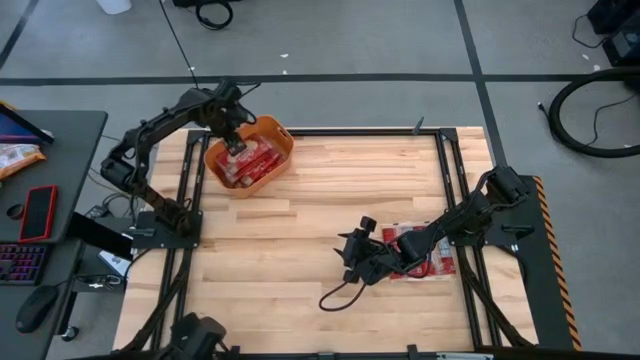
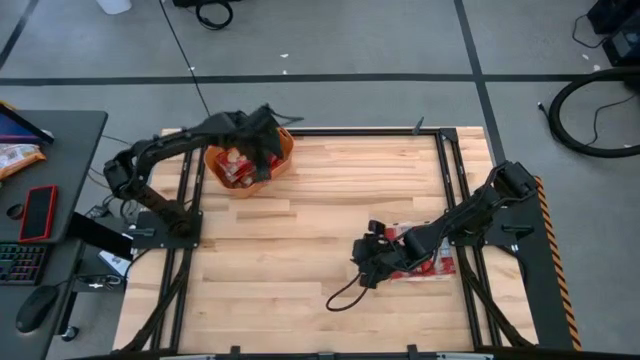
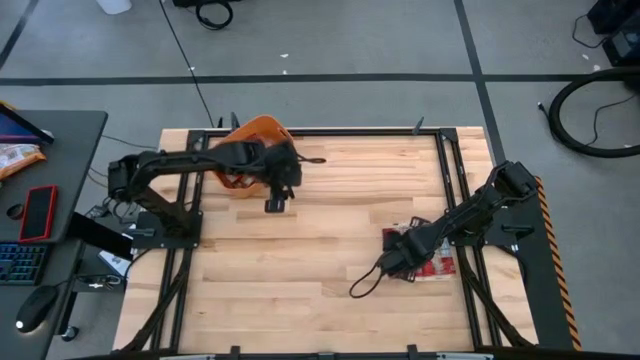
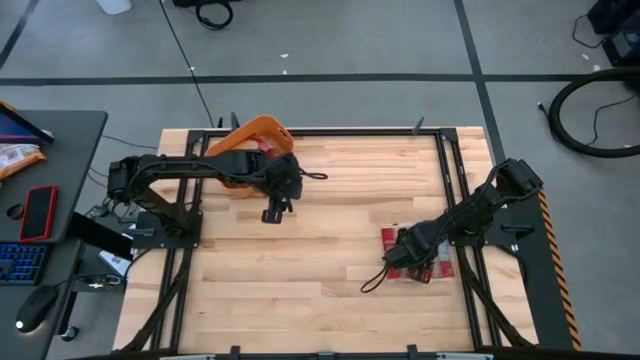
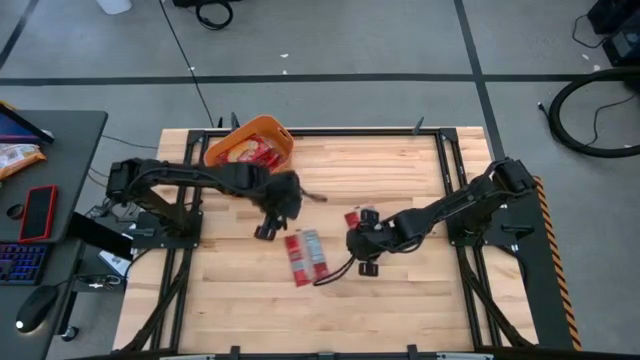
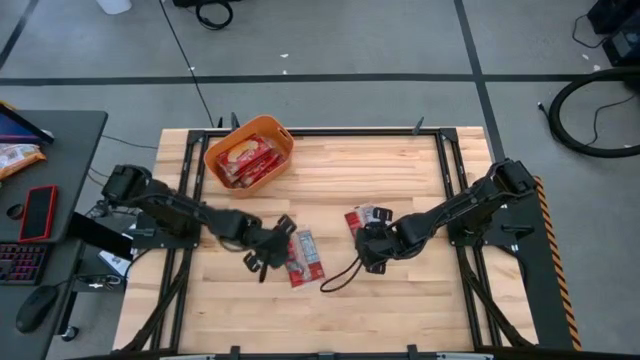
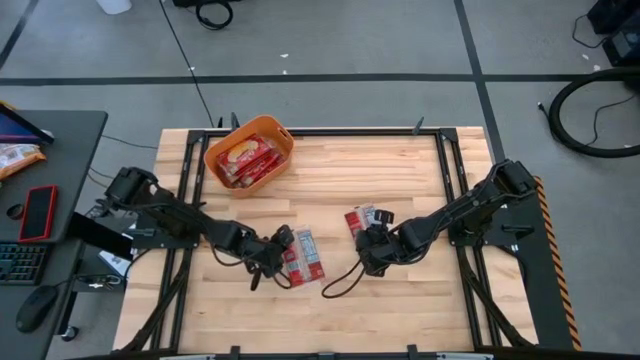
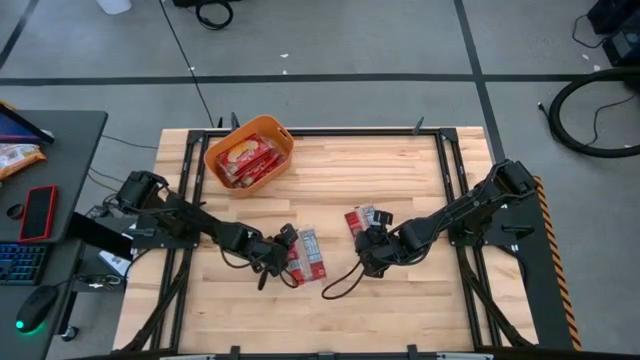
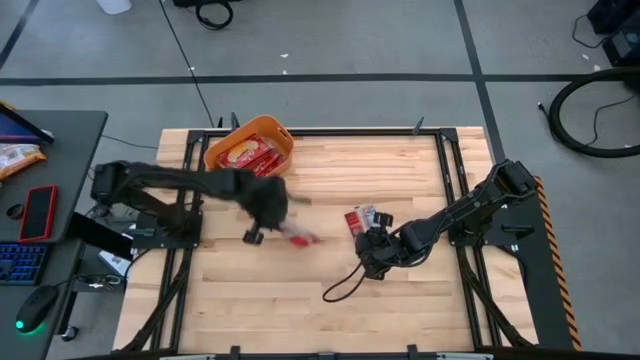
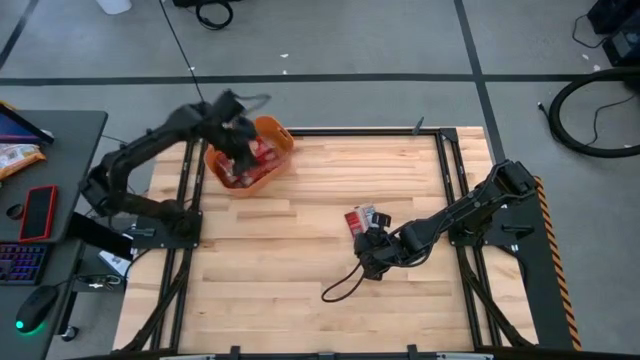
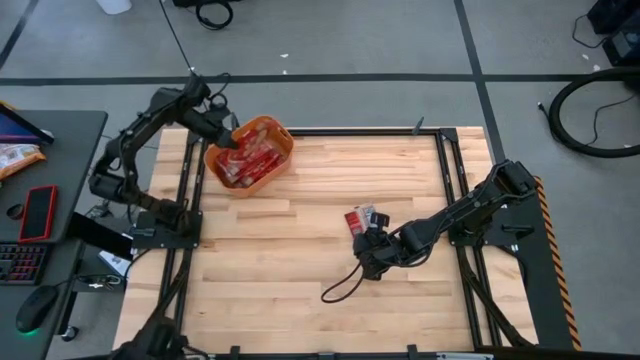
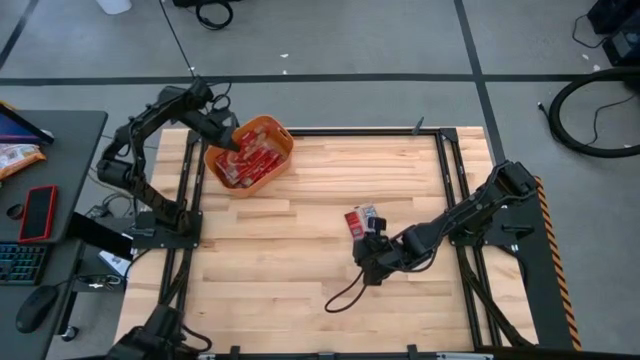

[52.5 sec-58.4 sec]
Task: Sort popcorn bags into baskets
Put the red popcorn bag into the orange container

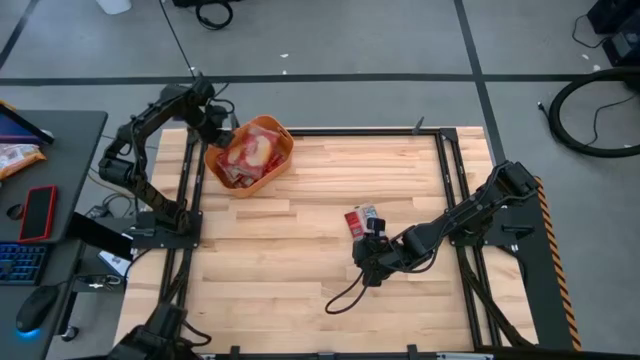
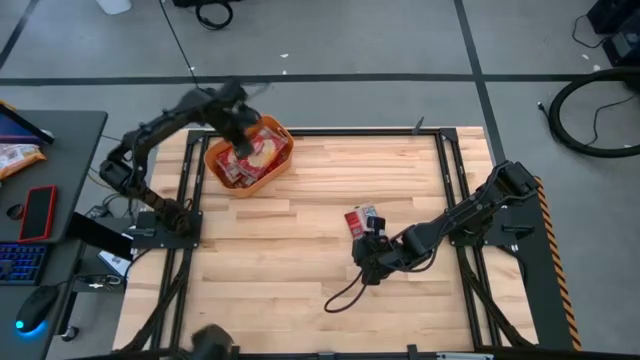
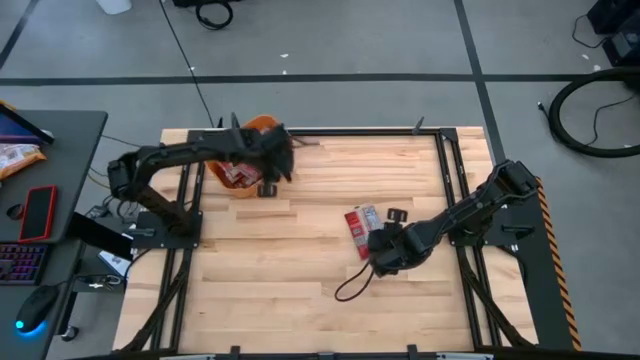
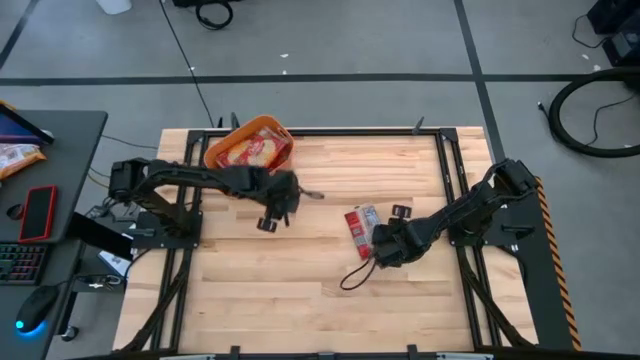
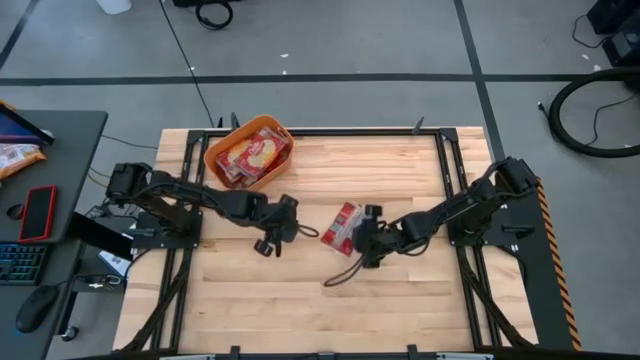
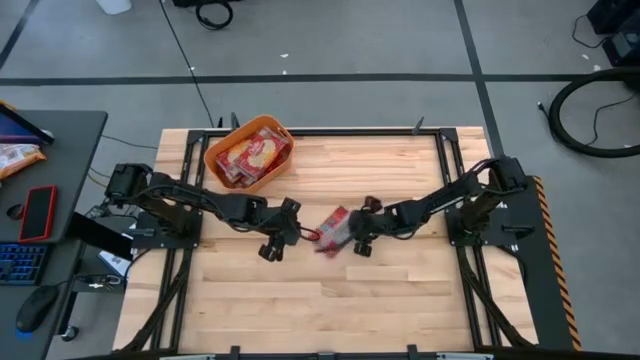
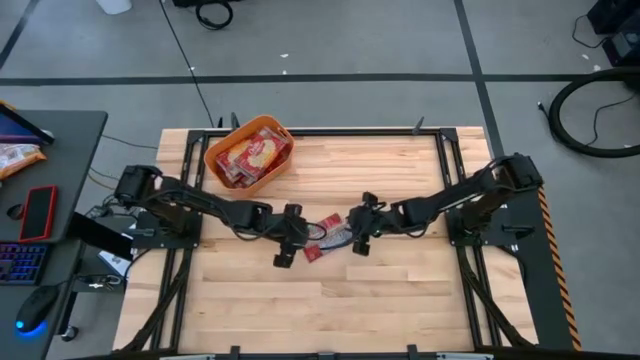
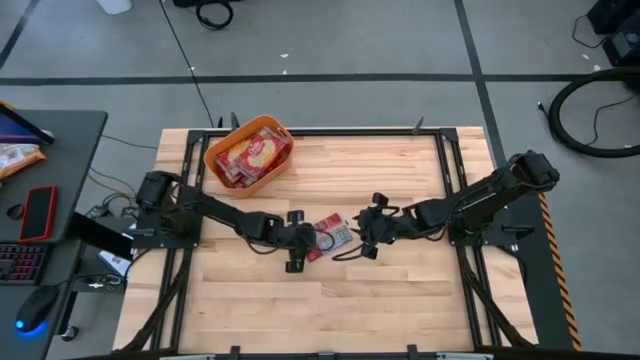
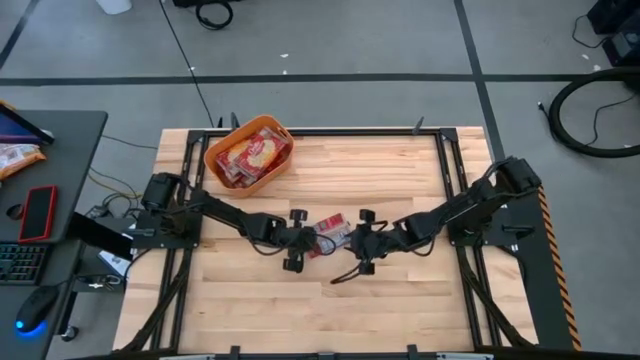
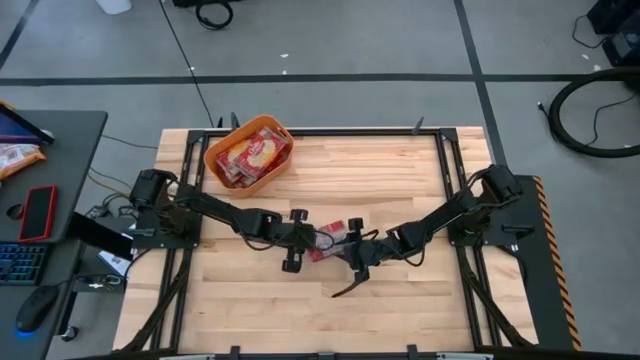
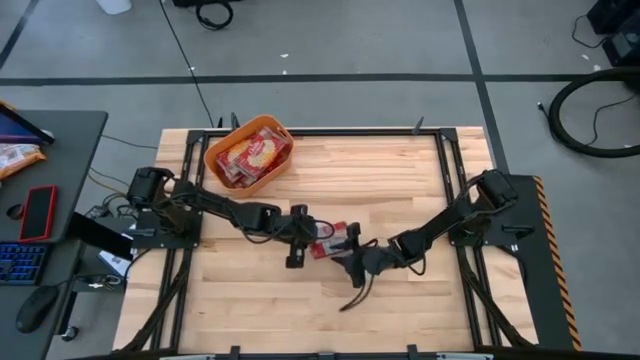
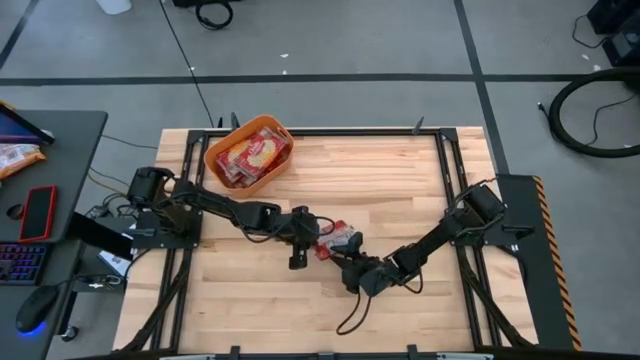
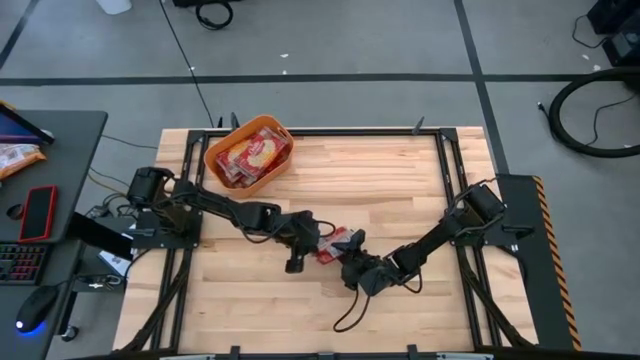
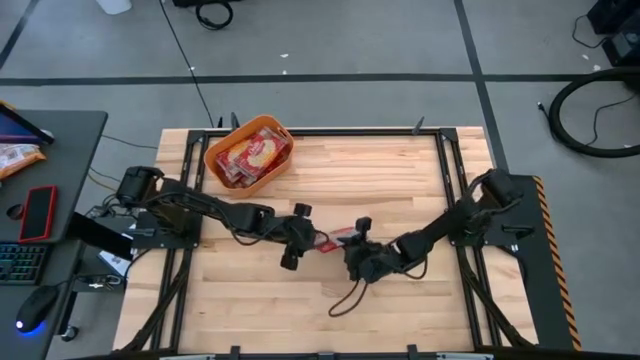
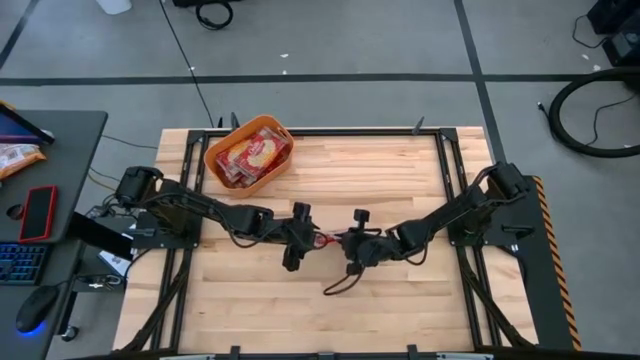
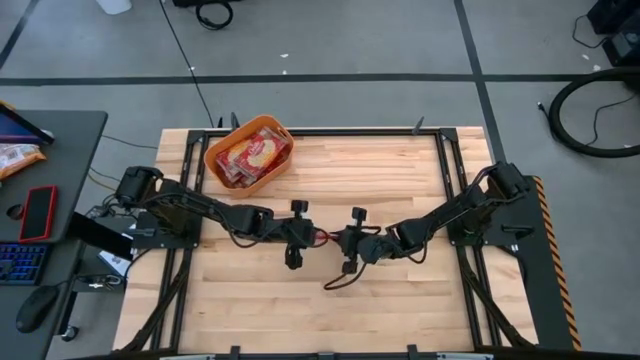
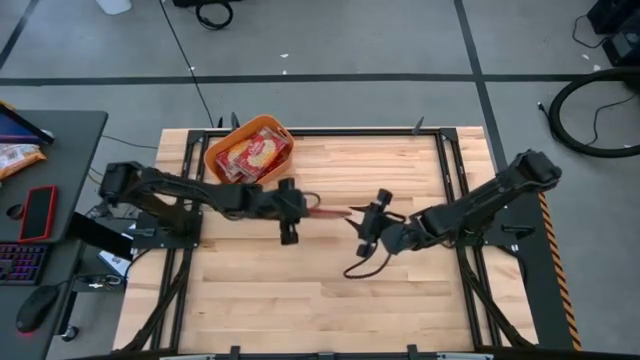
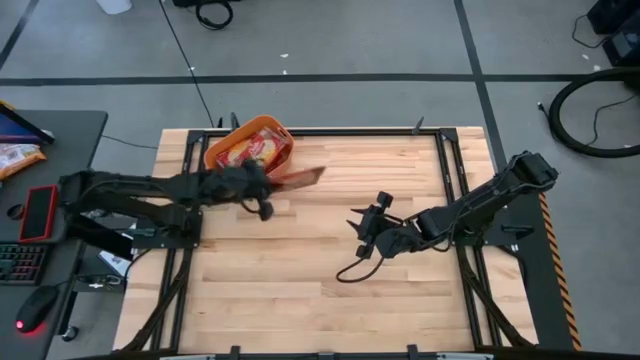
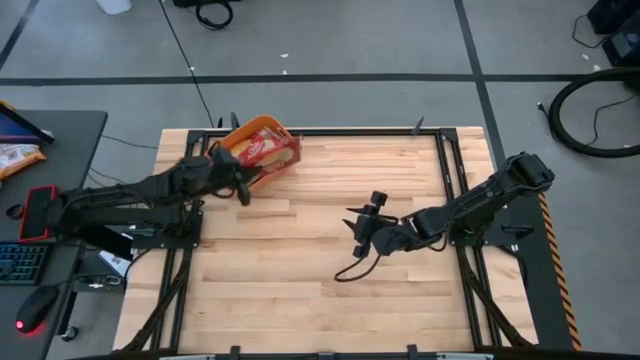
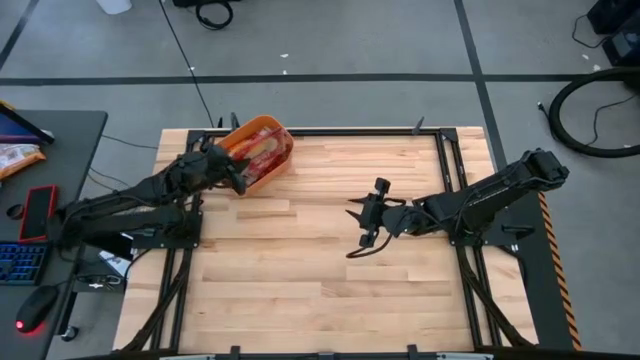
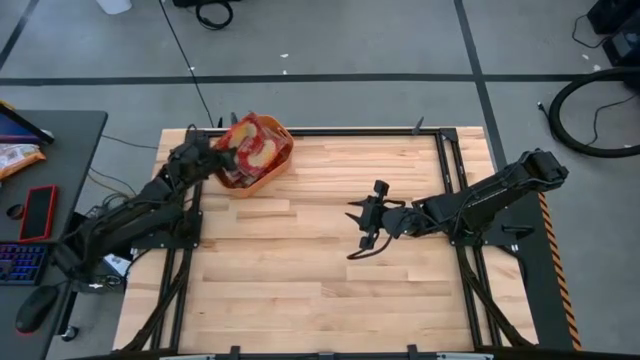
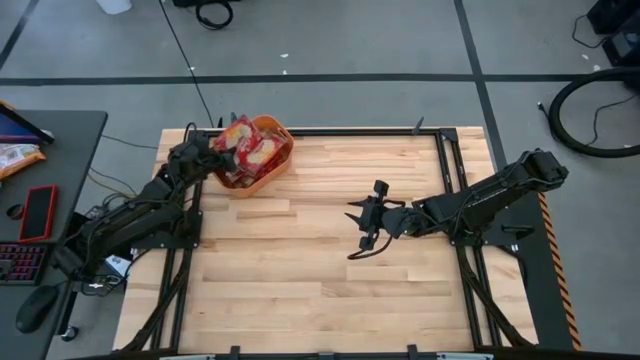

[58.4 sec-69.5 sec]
Put the red popcorn bag into the orange container

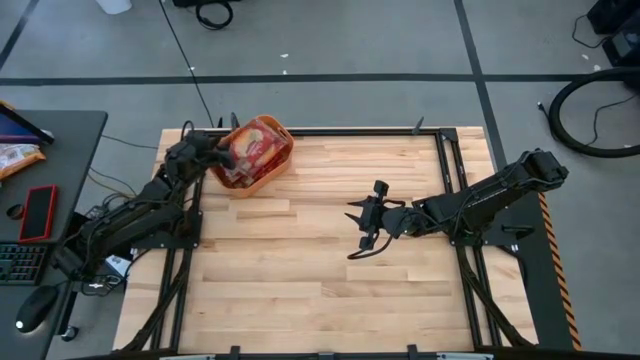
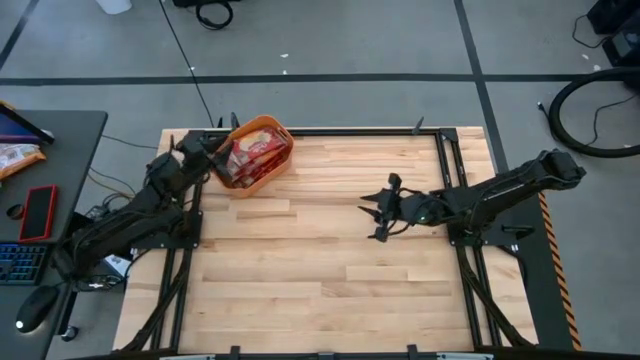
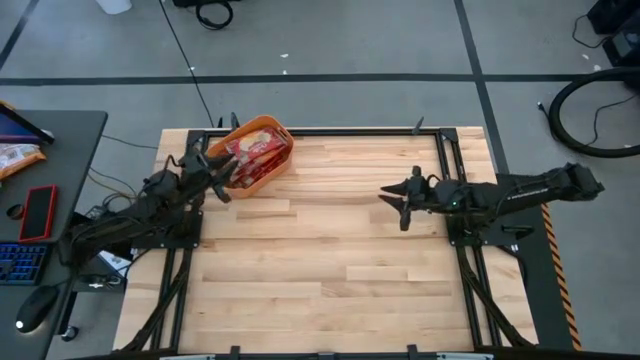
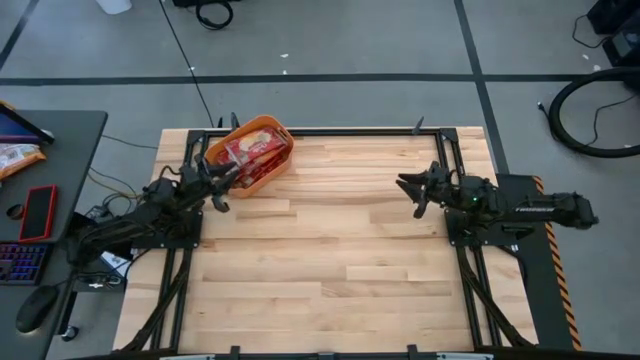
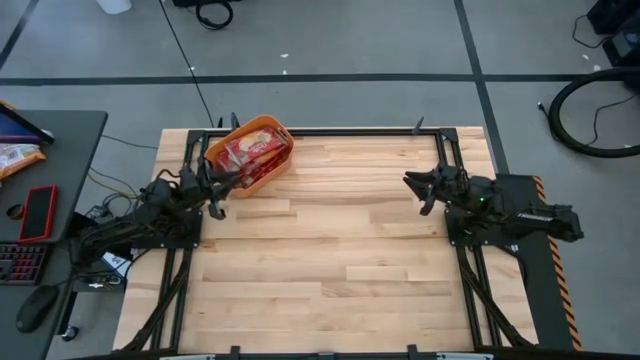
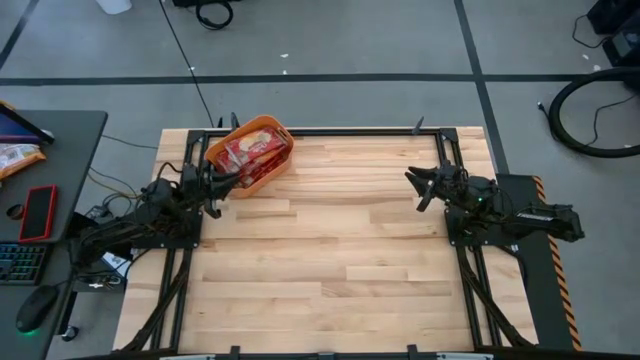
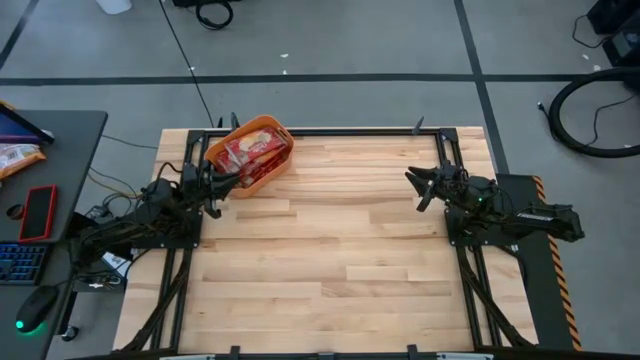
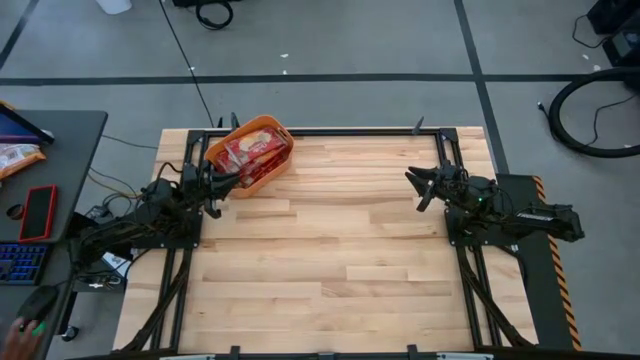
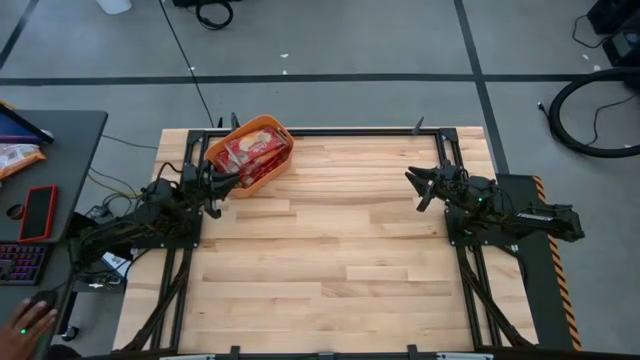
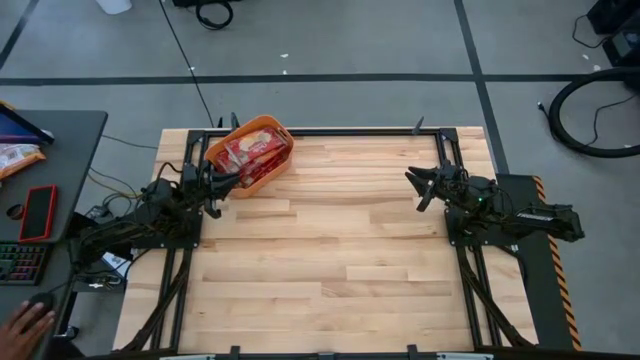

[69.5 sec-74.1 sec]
Return to Home Position
